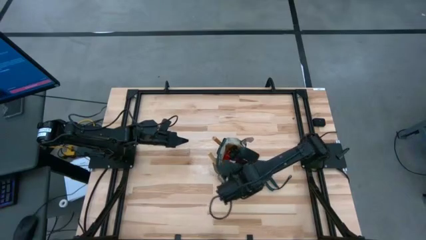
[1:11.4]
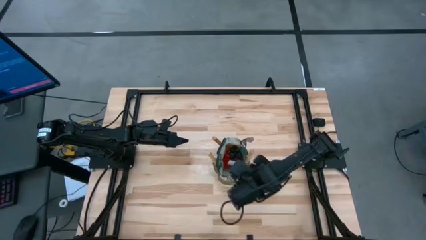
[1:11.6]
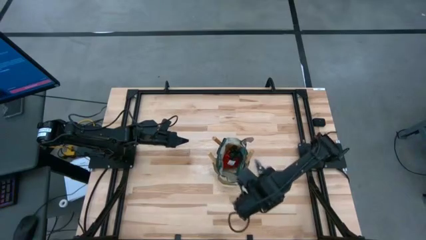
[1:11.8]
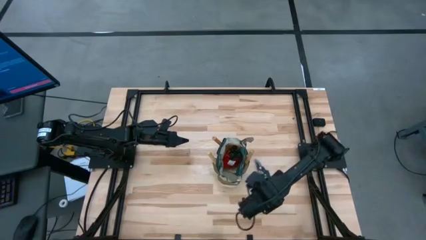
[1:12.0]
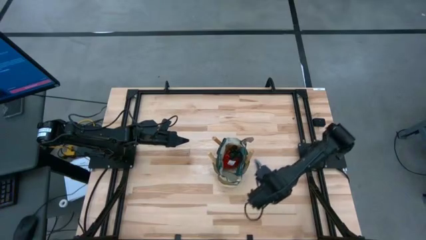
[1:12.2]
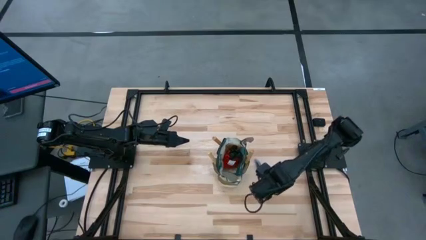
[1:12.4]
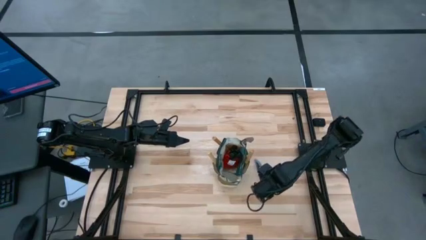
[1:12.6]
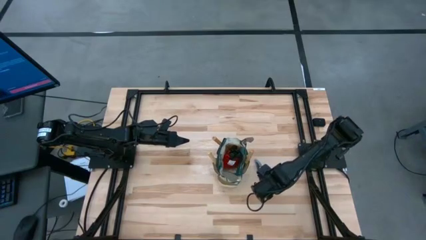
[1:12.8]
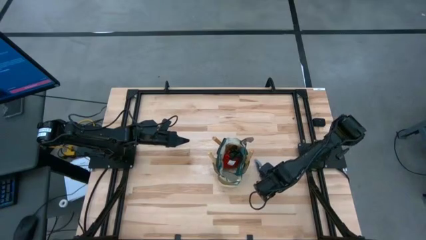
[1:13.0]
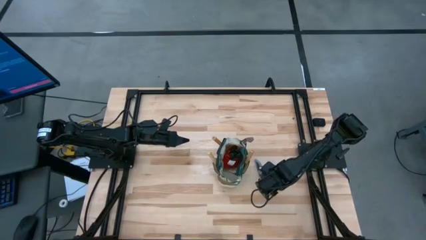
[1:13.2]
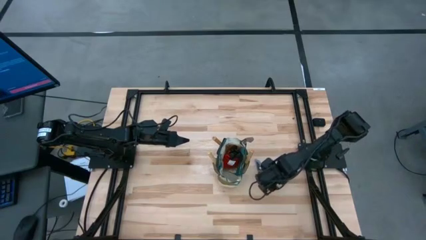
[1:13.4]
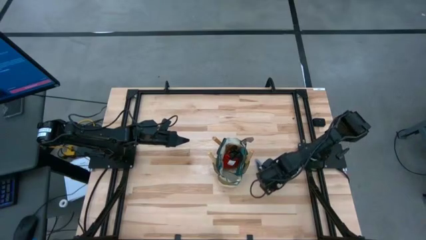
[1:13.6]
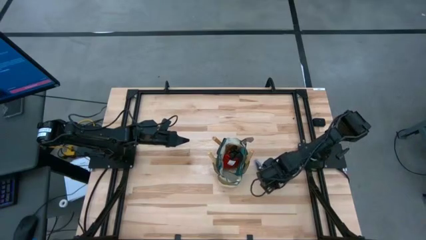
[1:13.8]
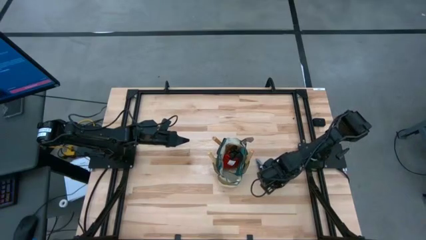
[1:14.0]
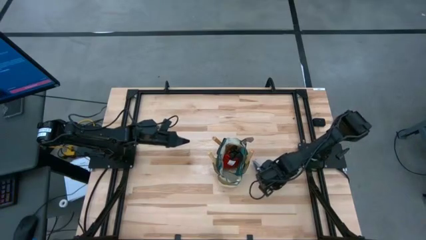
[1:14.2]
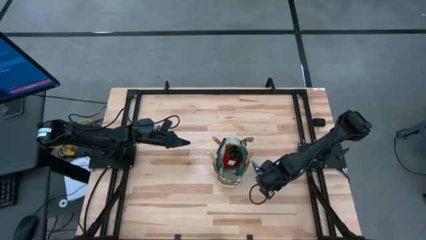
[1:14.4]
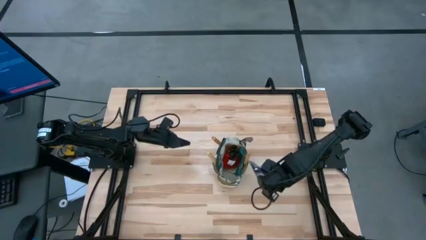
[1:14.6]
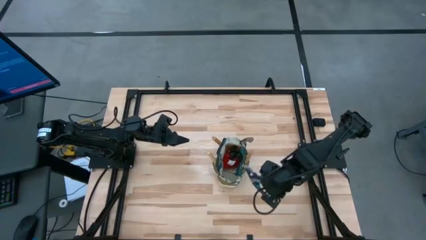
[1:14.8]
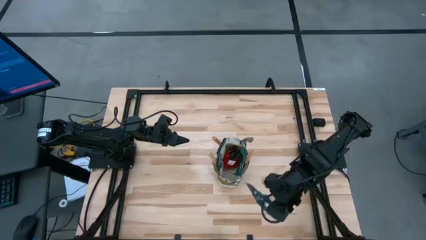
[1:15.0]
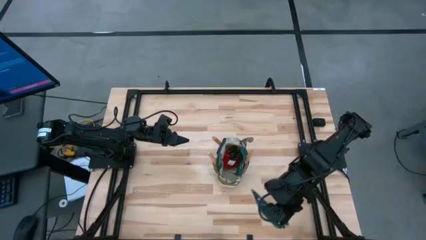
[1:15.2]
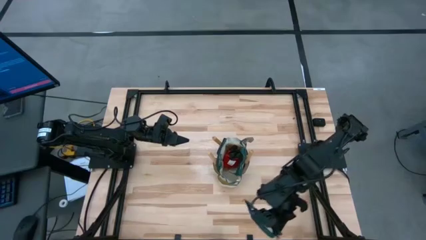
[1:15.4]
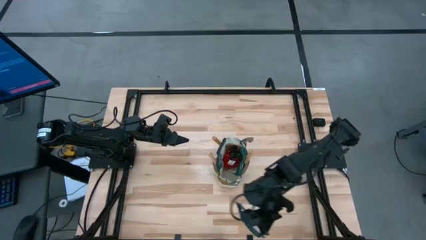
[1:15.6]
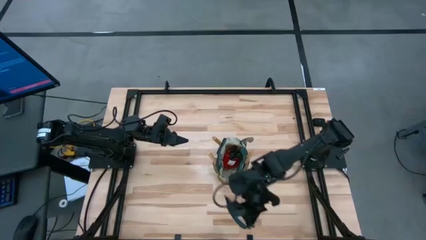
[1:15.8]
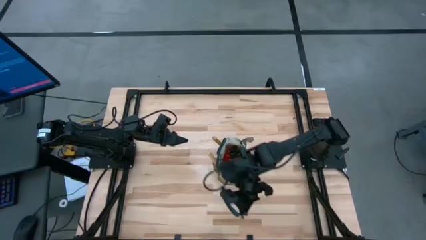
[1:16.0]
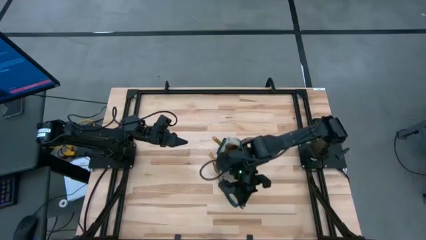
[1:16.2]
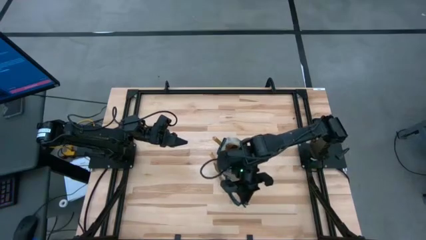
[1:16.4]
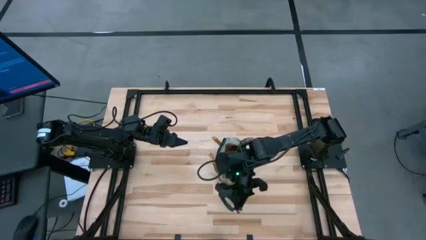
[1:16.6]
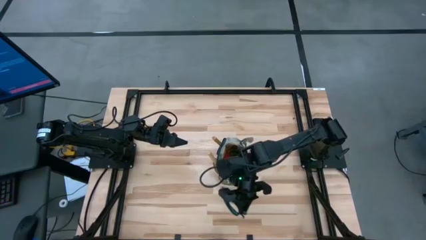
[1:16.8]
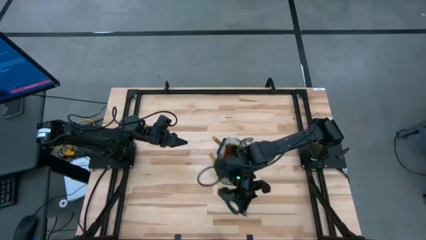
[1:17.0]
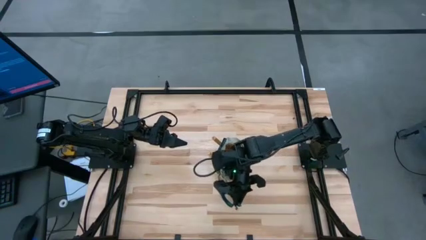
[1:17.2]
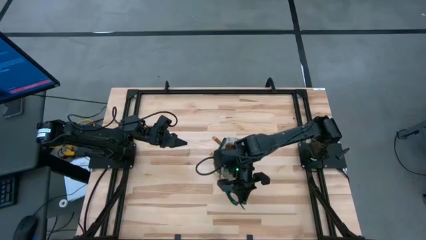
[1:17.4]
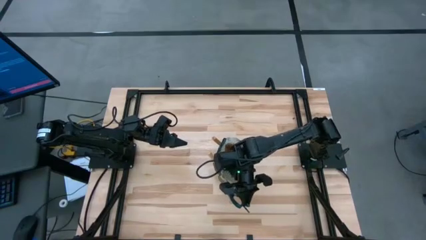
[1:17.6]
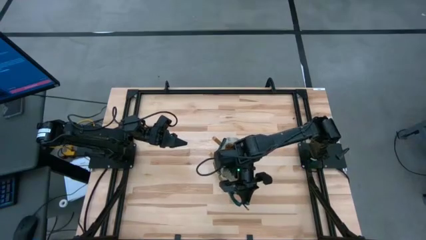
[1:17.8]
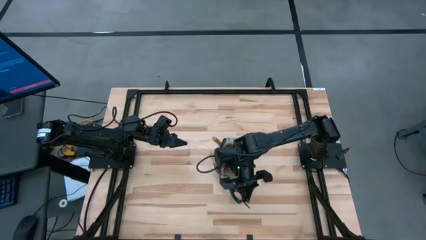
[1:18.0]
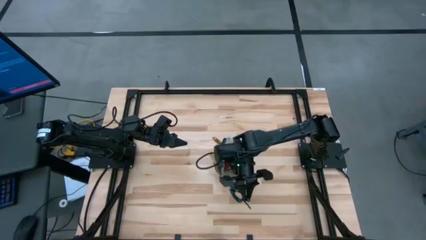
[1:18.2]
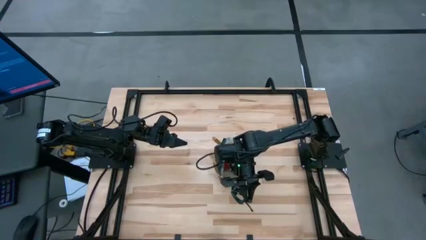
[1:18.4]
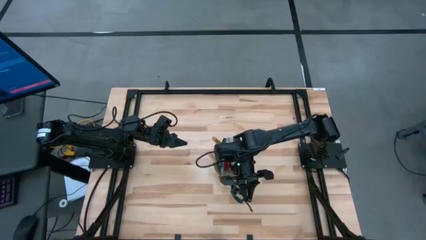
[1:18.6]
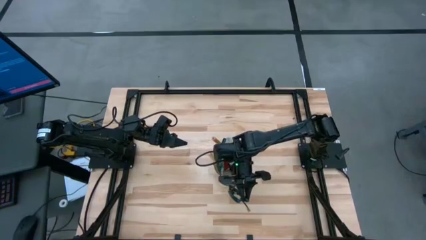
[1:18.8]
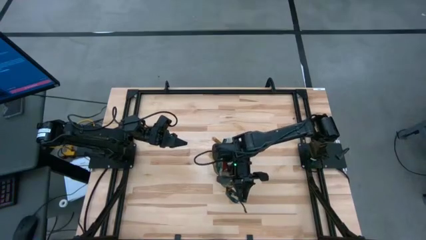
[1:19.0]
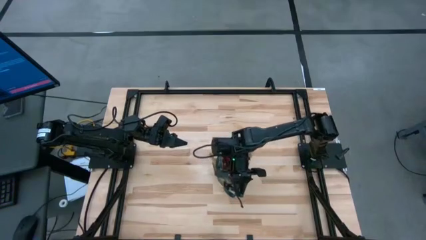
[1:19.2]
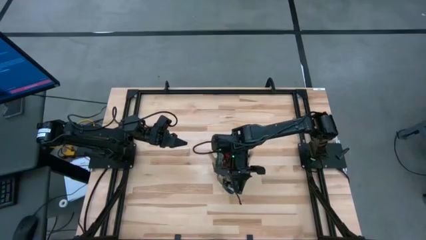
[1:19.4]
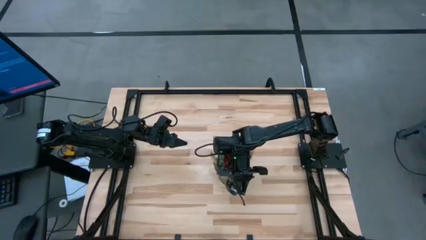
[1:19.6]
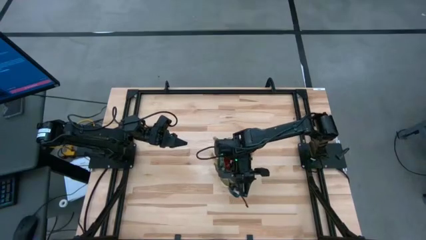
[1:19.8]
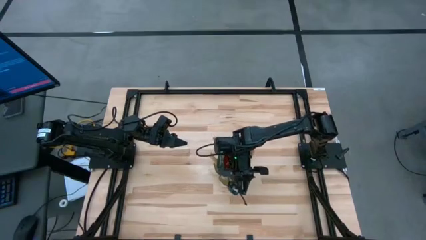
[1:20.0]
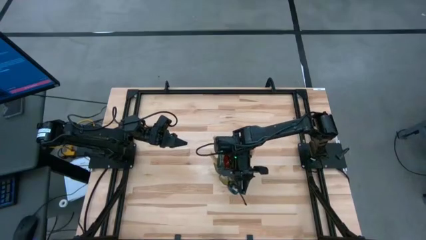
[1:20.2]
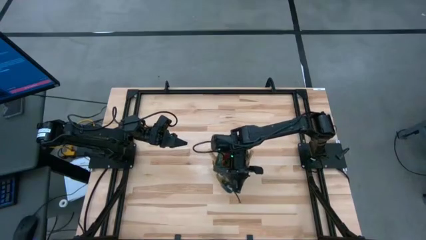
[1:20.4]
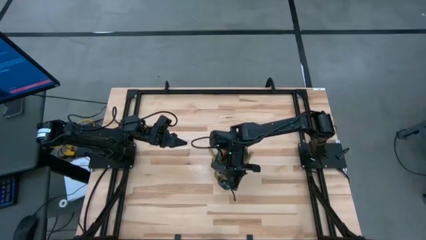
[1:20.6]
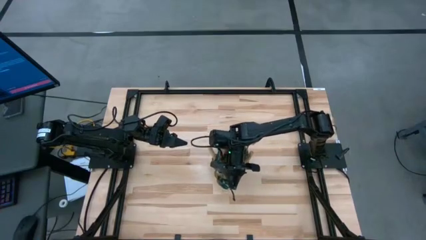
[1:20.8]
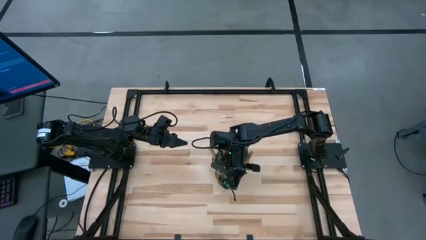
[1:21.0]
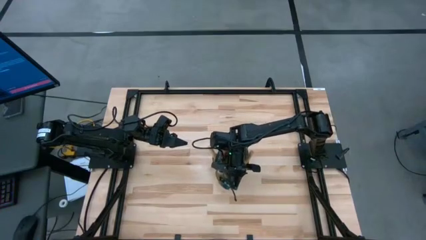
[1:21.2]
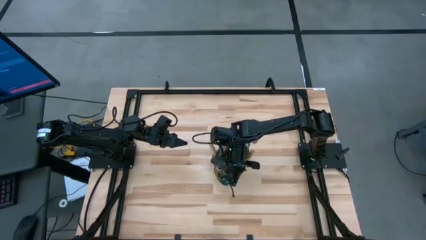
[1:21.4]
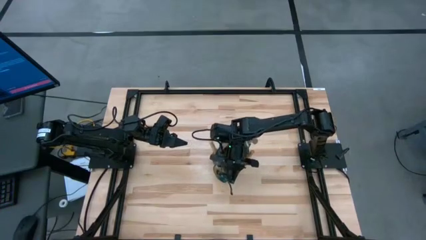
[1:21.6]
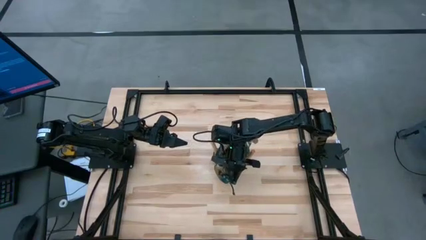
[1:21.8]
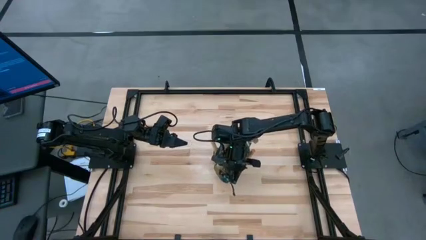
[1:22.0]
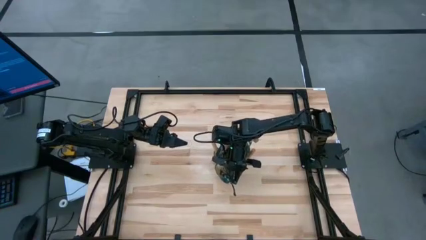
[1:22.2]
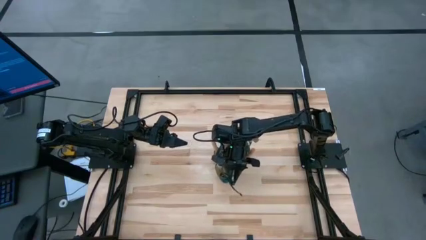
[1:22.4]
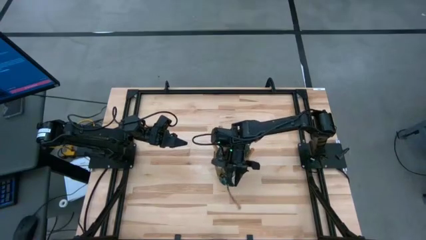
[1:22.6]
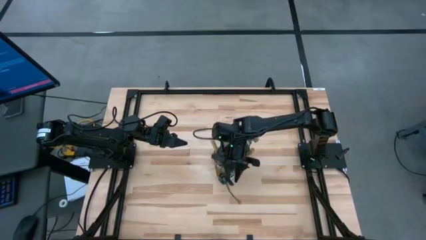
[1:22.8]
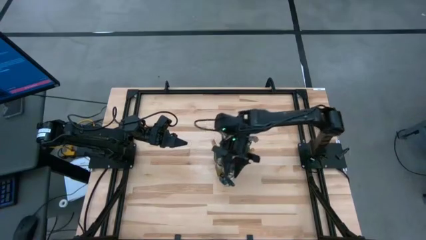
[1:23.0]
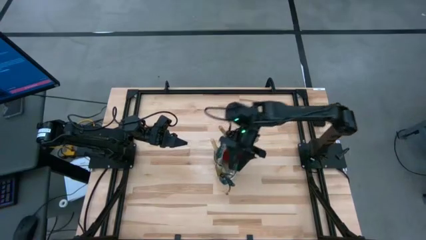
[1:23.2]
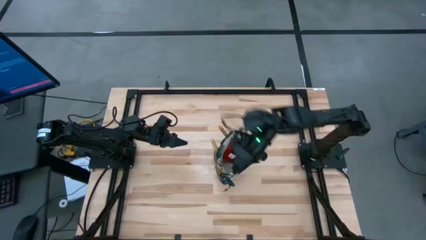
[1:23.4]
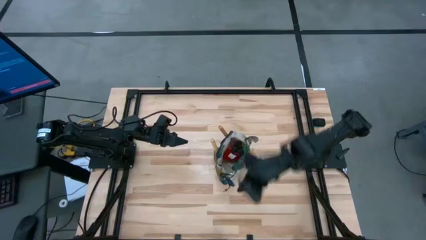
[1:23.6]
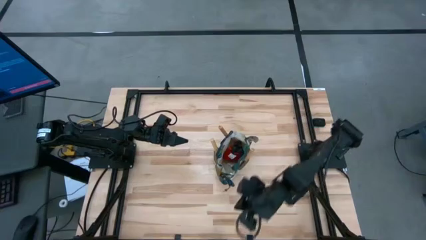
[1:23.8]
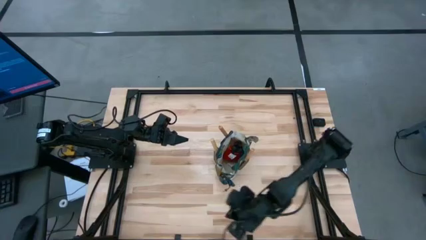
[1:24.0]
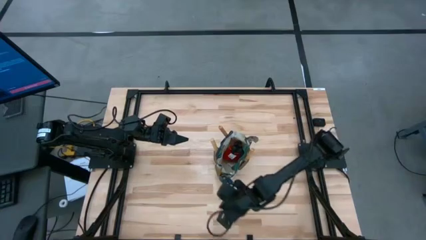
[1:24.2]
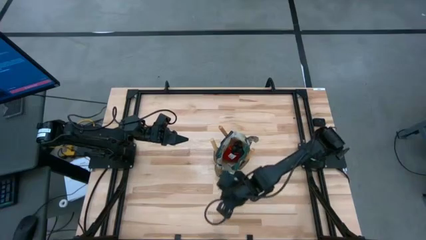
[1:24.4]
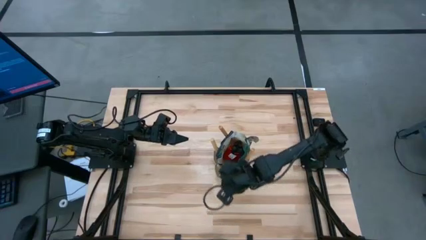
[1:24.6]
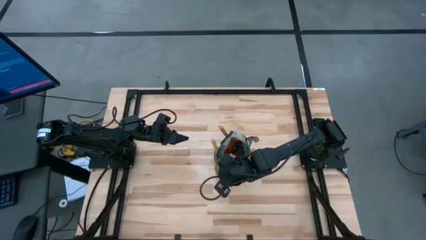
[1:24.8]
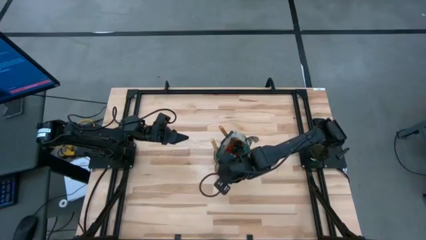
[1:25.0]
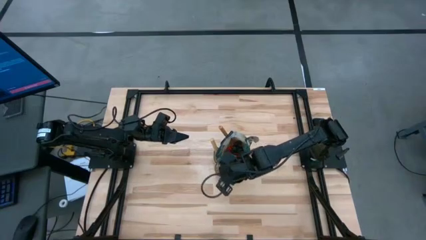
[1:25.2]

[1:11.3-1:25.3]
Task: Pick & Place Garden tools in Gardening bag
Put the green shear scissor into the green gardening bag

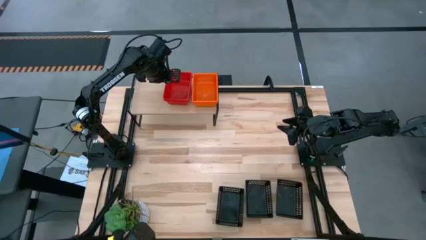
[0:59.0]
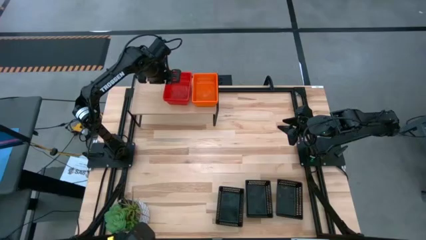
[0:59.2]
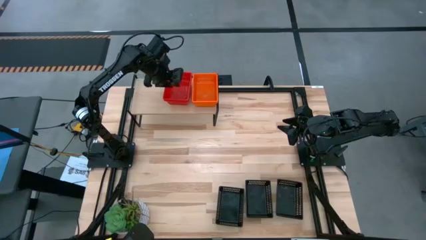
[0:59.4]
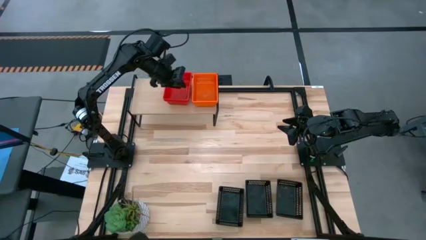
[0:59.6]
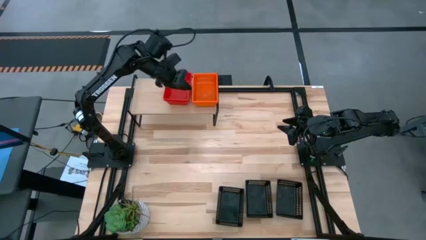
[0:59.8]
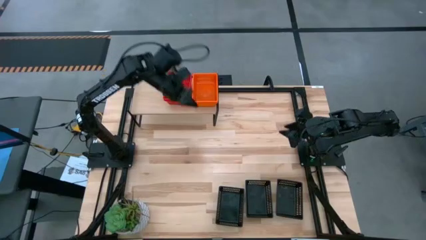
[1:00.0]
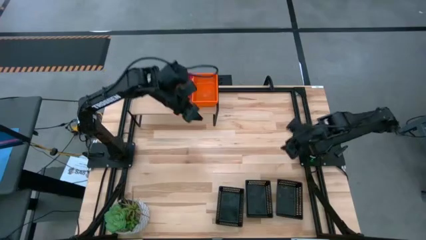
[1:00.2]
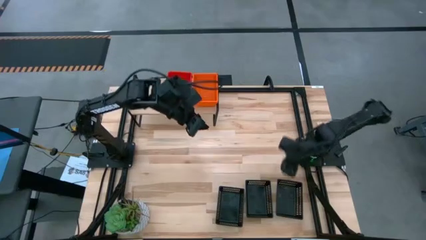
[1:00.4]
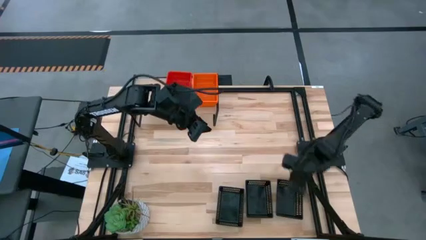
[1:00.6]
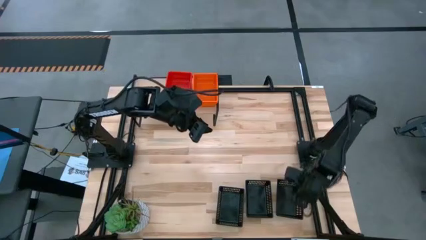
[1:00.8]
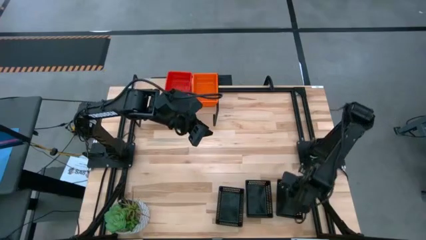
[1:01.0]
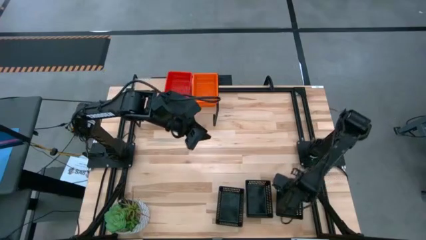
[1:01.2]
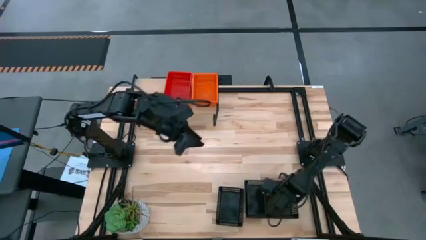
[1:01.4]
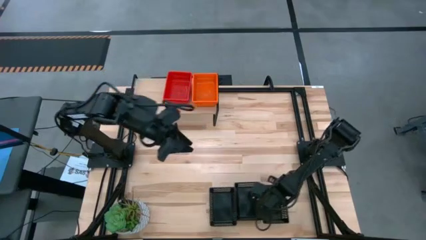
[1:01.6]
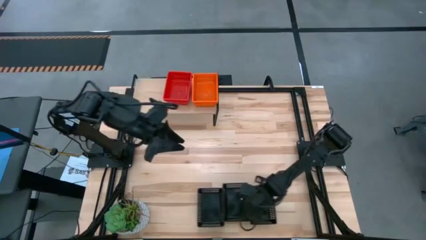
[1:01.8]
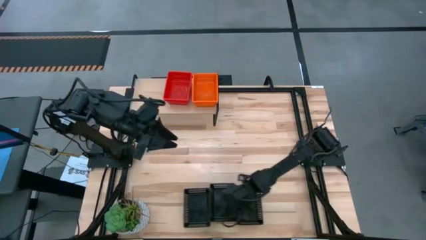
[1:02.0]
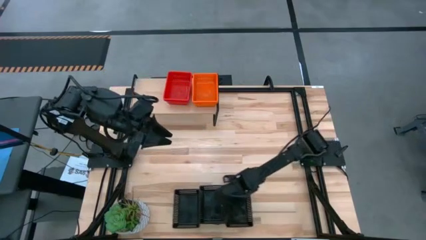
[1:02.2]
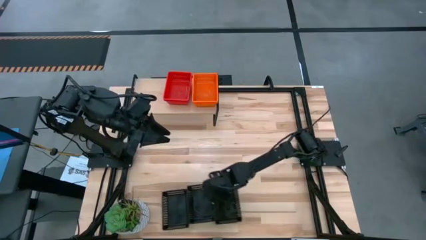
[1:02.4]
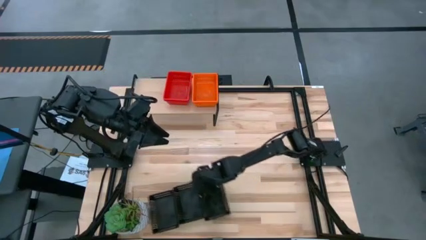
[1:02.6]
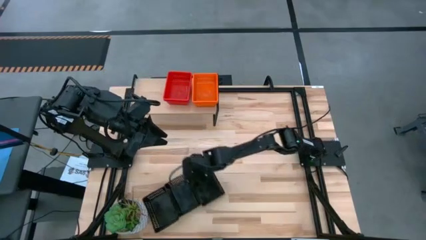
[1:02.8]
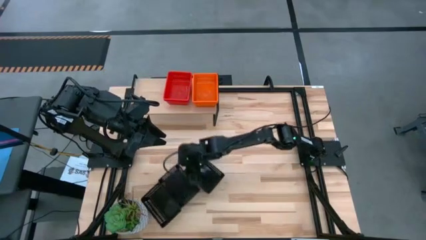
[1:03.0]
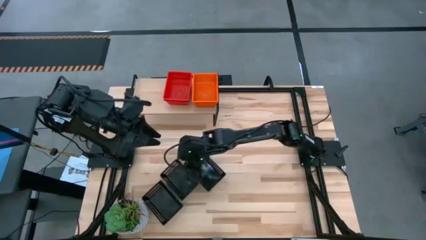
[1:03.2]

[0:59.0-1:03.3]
Task: Stack baskets on shelf by color
Adjust the black bins
